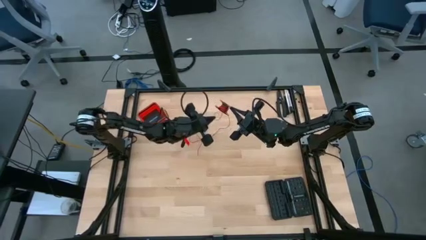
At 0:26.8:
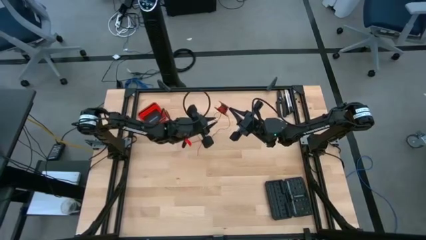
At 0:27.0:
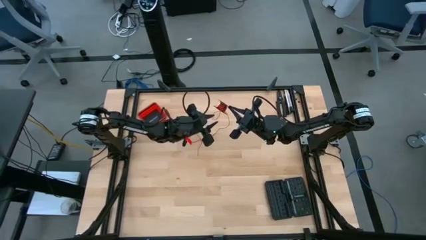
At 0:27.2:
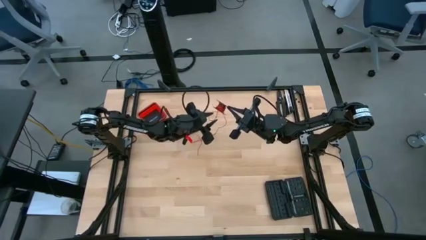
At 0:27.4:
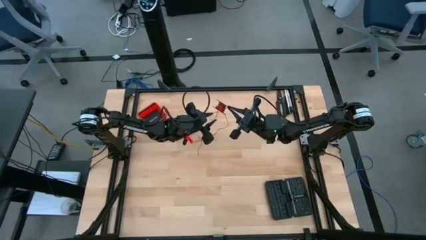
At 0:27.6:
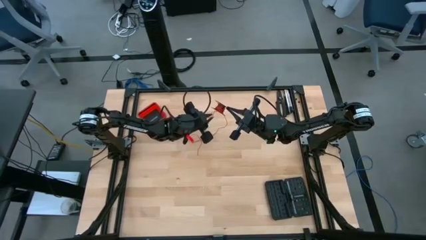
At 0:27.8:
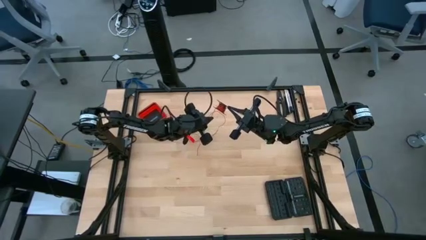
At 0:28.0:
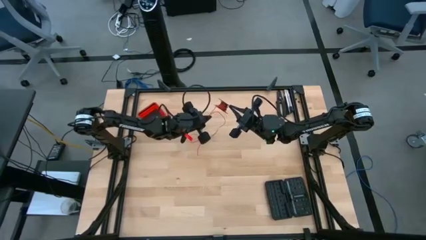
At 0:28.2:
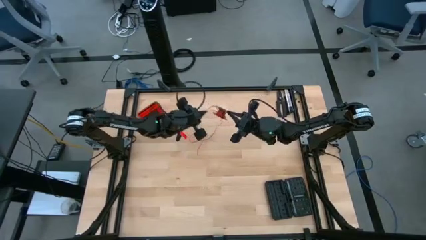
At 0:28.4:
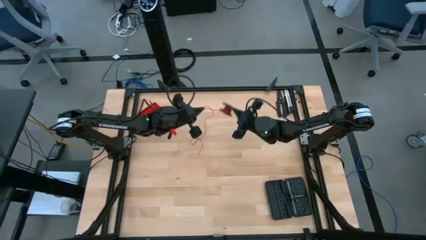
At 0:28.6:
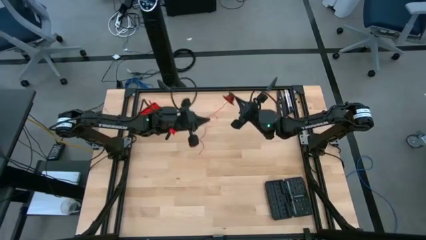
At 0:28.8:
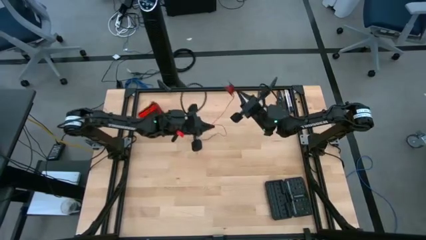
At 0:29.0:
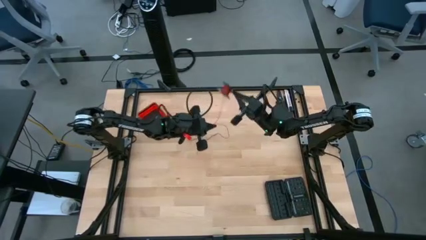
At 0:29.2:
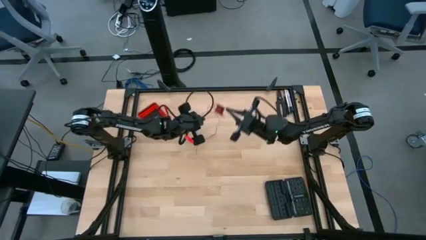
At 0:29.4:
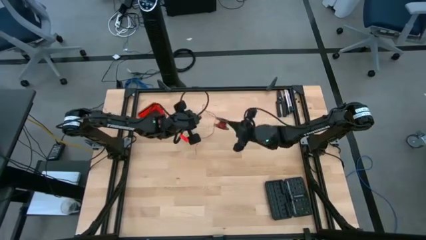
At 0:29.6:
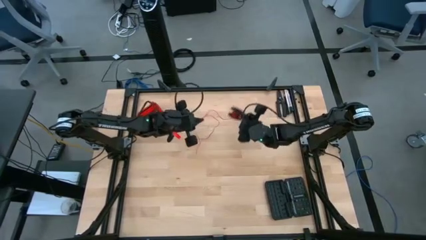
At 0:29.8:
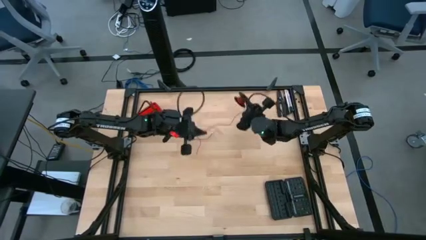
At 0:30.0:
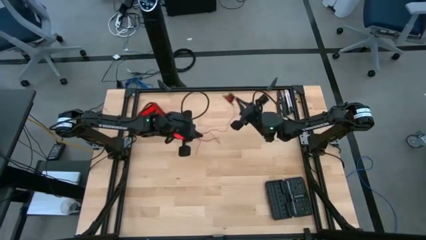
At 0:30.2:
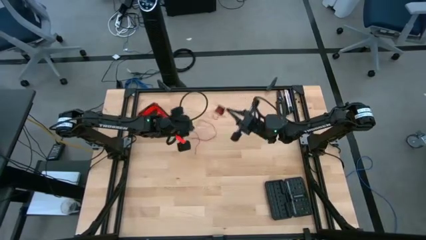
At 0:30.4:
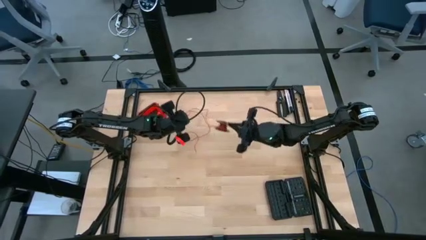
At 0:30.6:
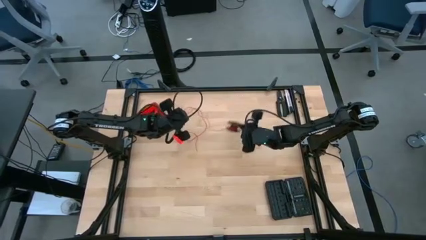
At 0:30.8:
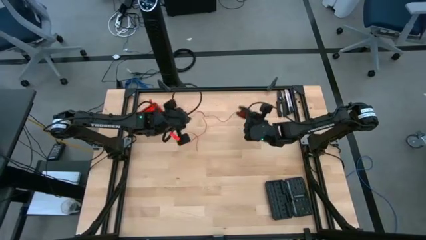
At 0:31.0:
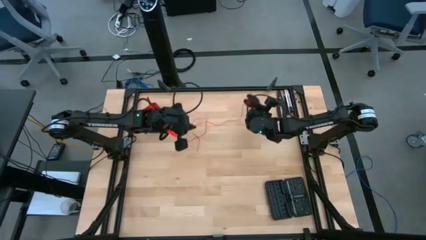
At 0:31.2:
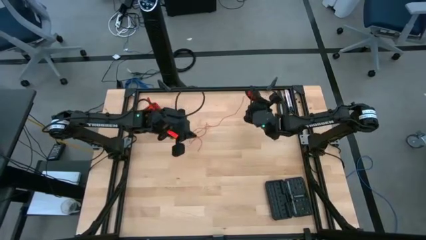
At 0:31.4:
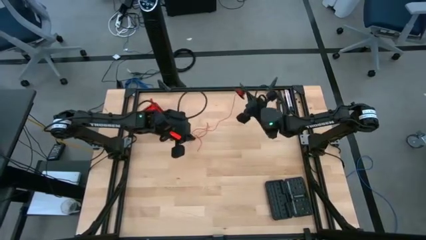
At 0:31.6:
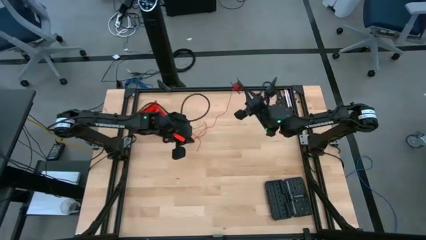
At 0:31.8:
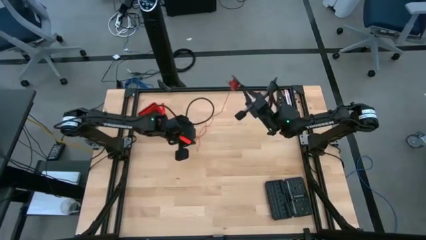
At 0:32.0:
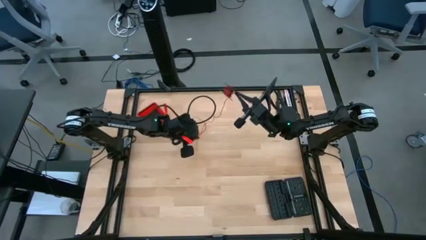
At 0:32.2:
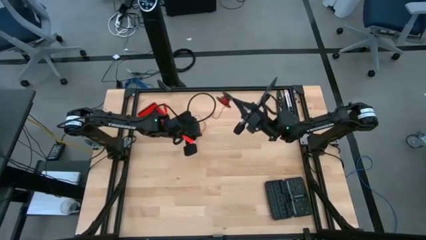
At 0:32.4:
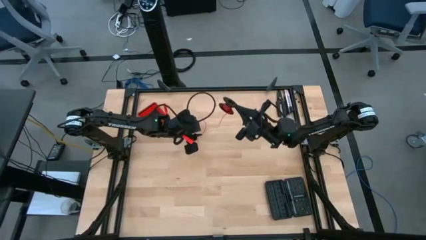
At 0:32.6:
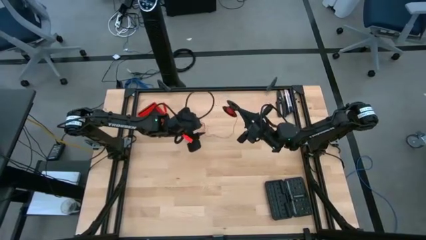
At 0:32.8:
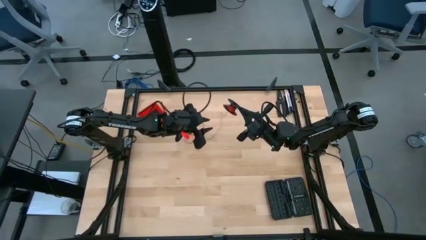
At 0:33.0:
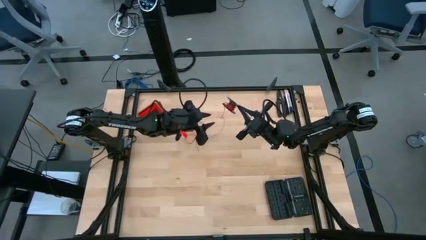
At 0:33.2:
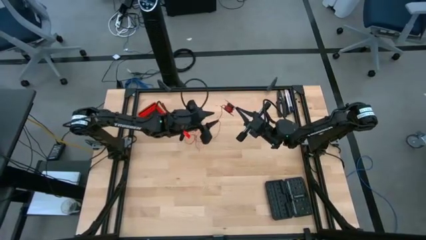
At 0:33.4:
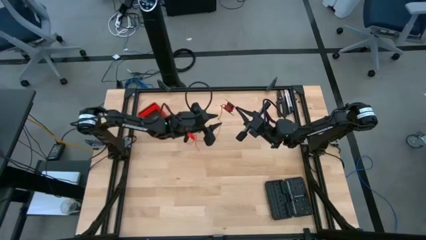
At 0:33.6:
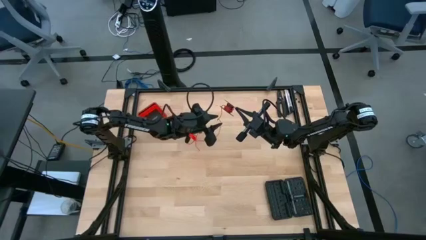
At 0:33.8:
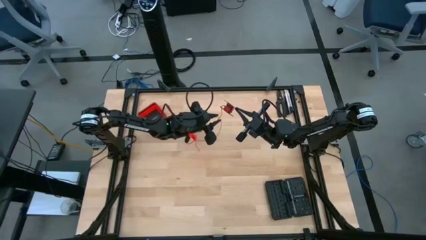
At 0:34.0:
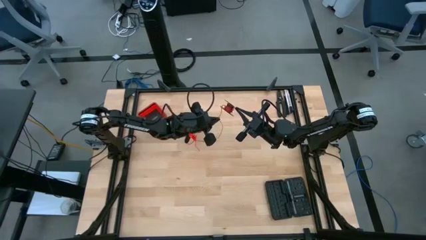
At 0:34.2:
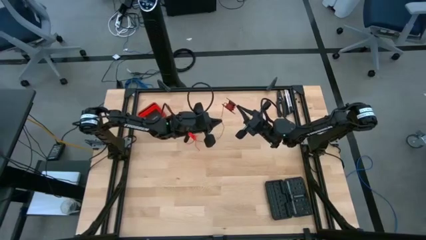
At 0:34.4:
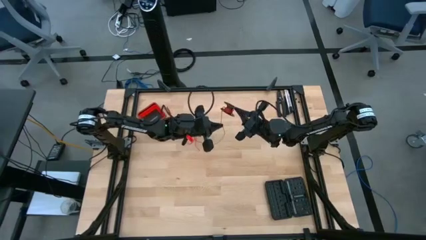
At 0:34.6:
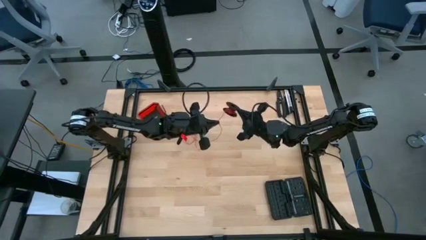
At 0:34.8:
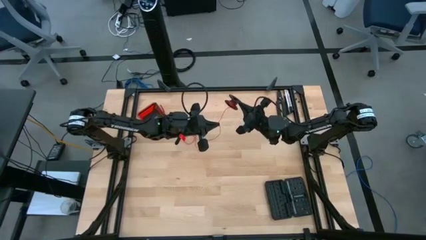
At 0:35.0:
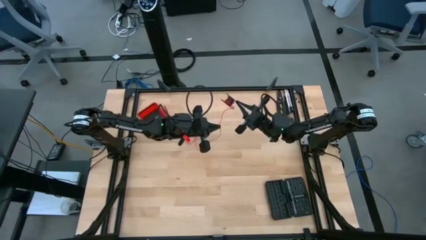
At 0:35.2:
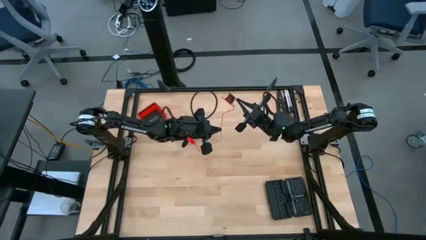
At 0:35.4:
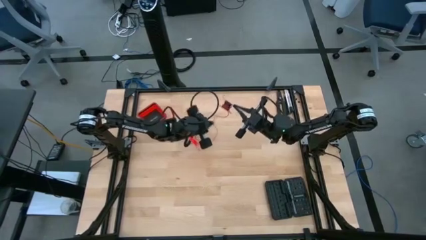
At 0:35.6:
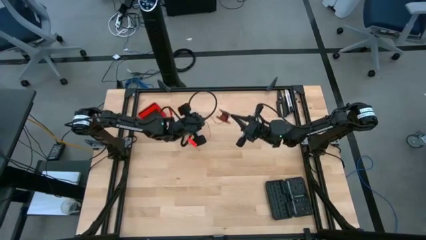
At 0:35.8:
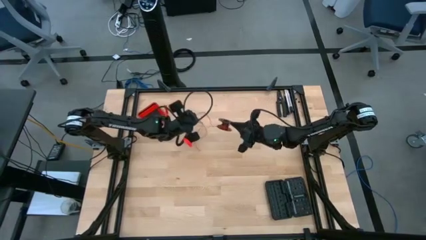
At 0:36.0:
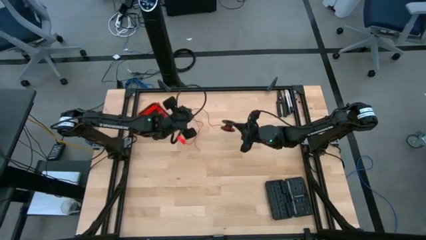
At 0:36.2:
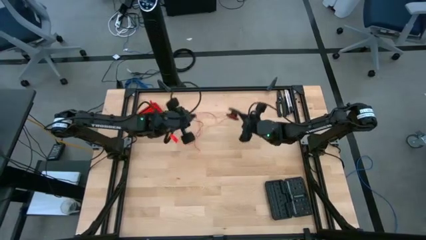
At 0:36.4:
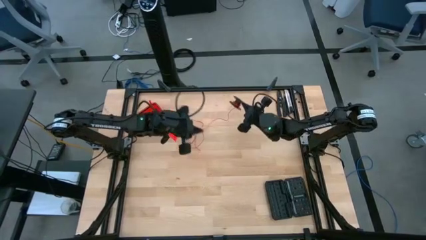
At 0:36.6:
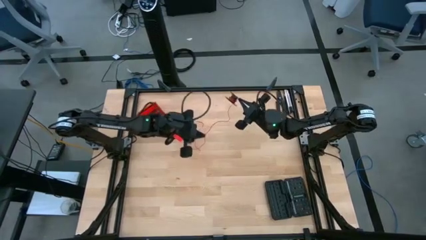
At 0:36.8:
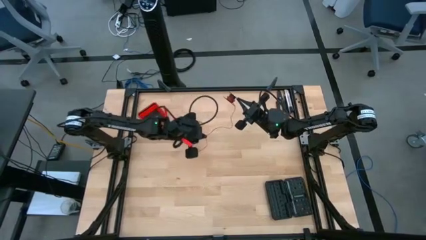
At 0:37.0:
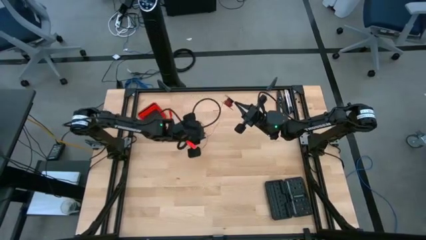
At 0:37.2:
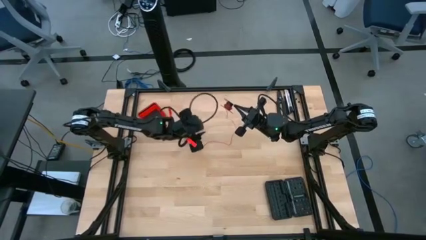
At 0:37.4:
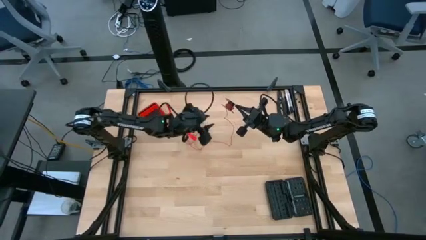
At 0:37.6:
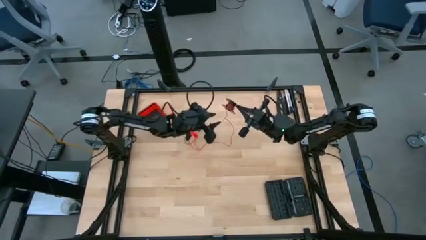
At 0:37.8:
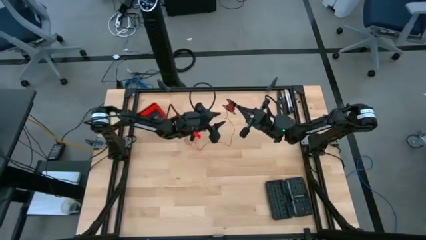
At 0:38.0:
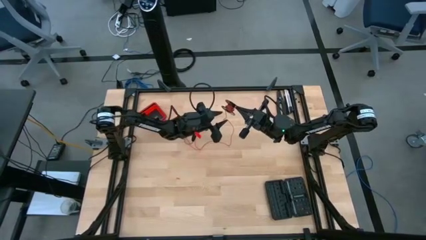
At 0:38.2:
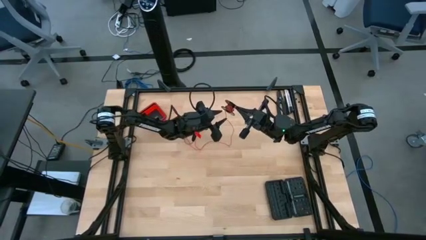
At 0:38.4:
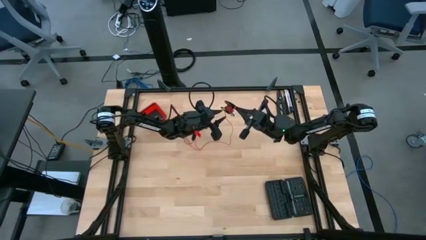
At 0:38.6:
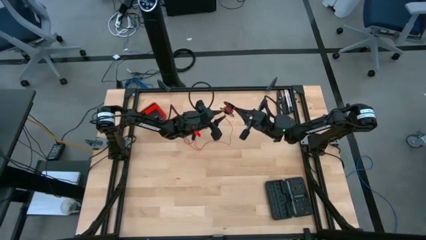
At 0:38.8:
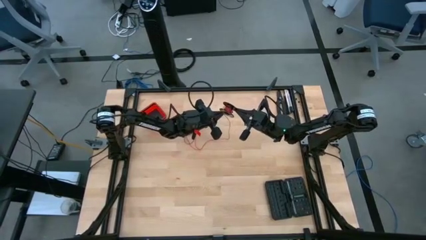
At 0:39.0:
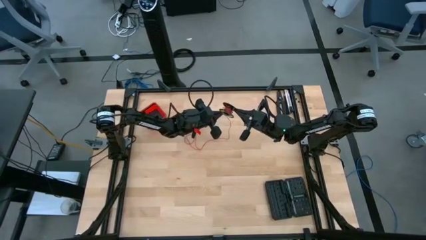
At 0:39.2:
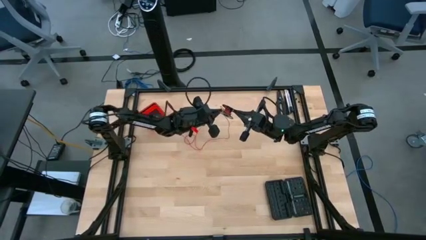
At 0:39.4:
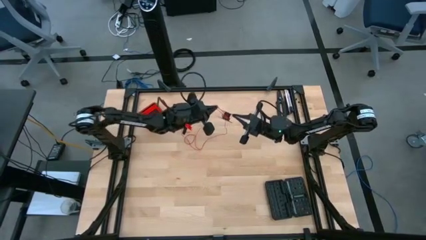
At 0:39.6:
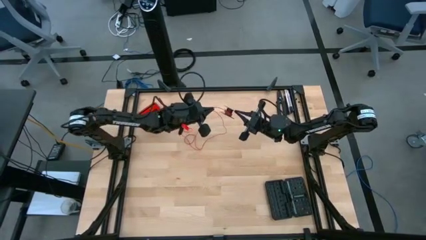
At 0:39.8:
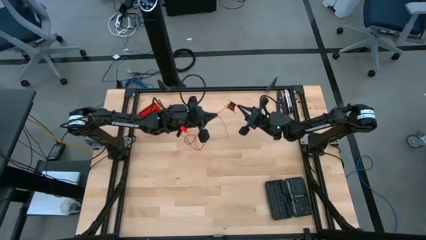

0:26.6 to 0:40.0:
Task: Coil cords
Uncoil the wire to the spool
